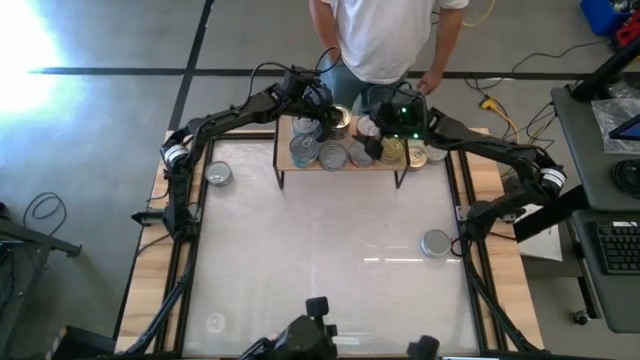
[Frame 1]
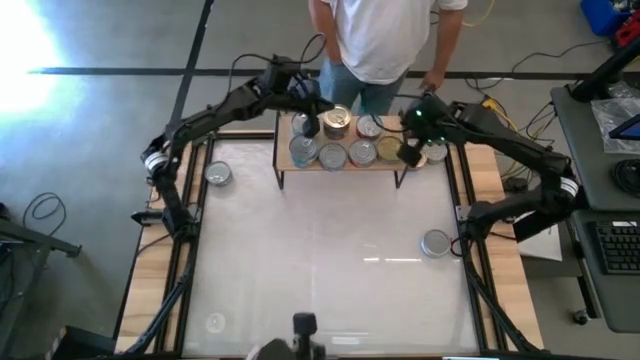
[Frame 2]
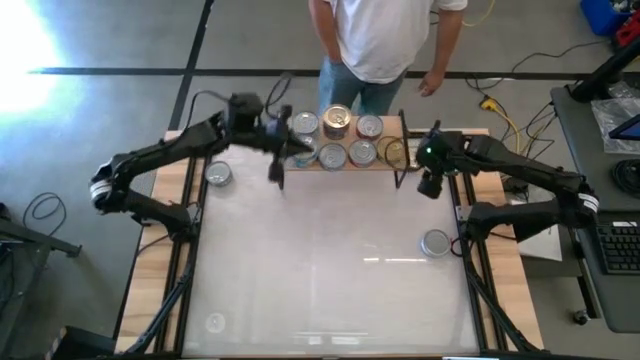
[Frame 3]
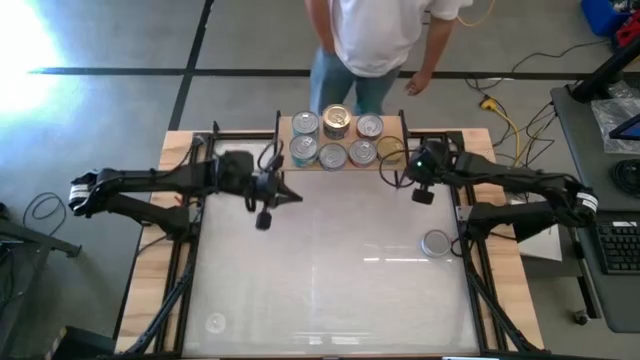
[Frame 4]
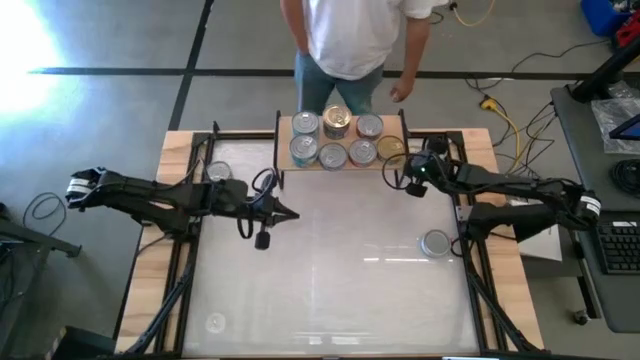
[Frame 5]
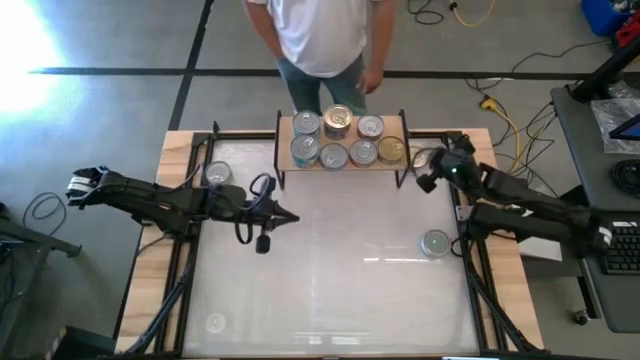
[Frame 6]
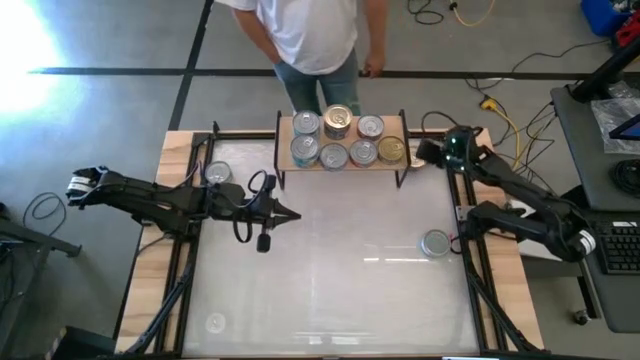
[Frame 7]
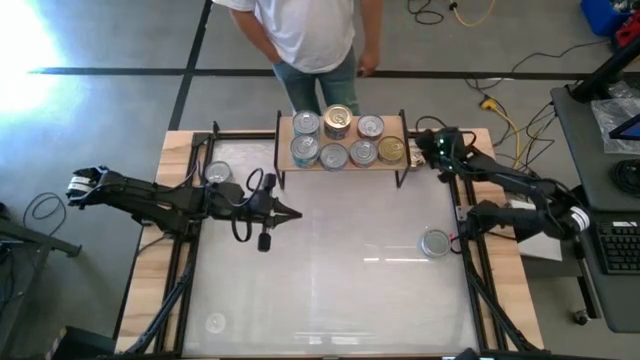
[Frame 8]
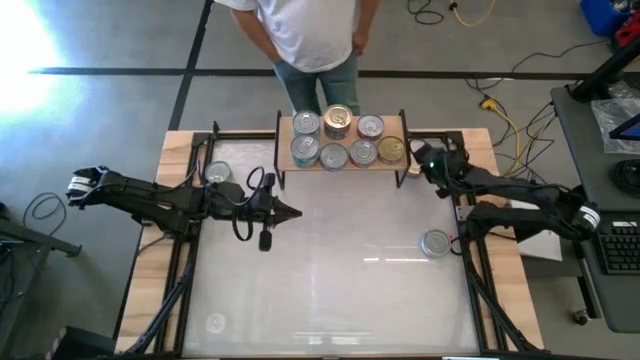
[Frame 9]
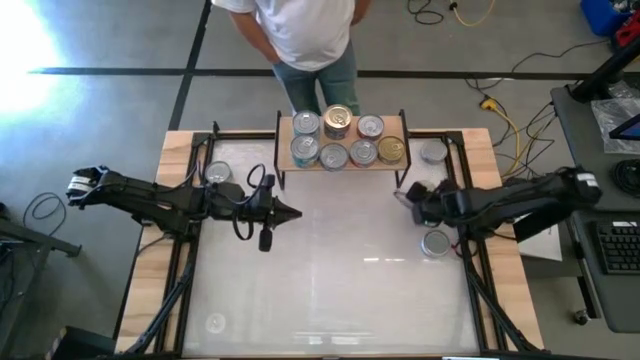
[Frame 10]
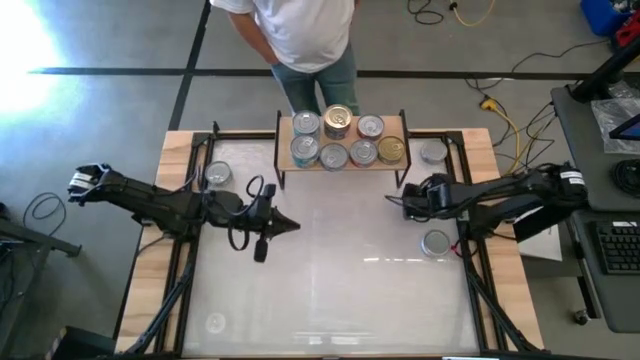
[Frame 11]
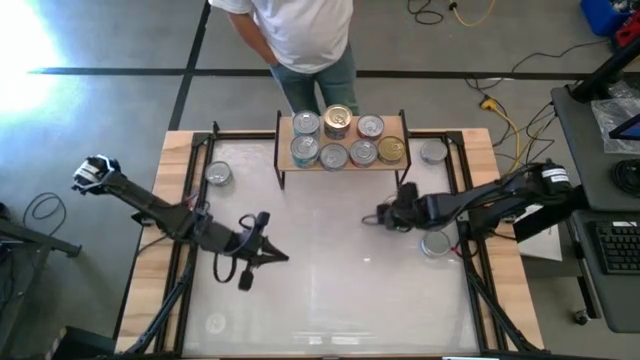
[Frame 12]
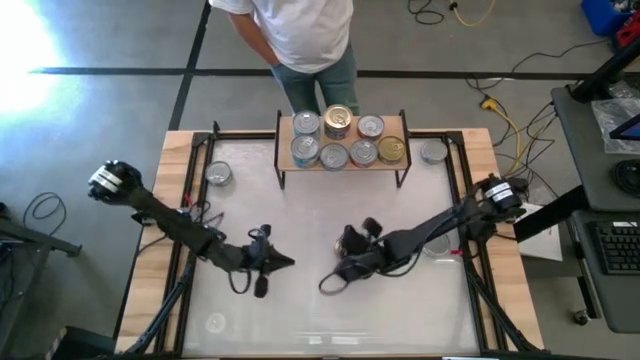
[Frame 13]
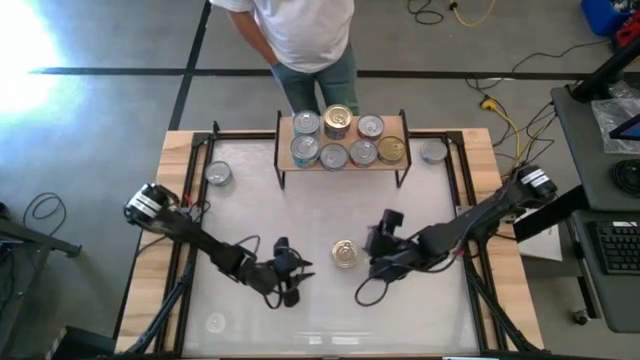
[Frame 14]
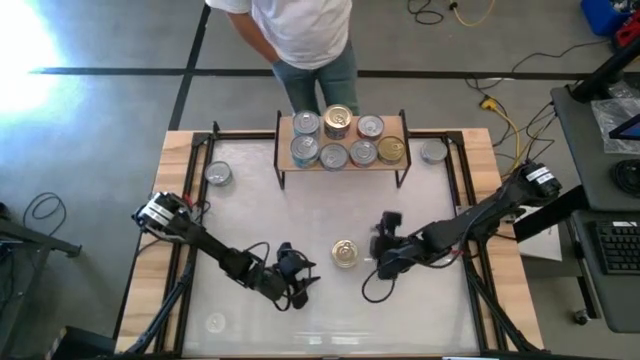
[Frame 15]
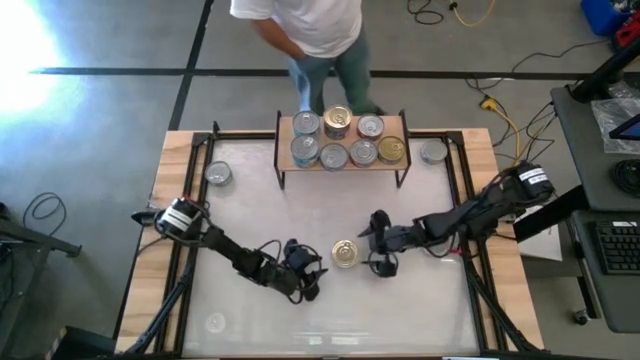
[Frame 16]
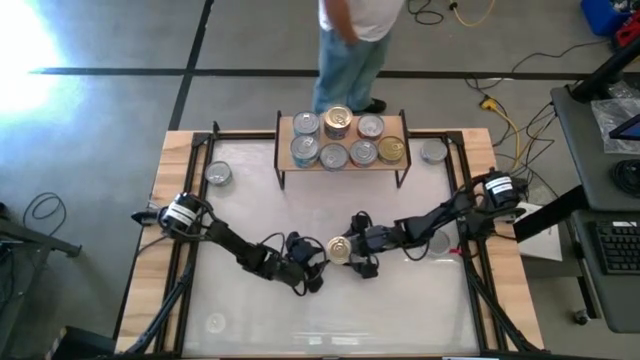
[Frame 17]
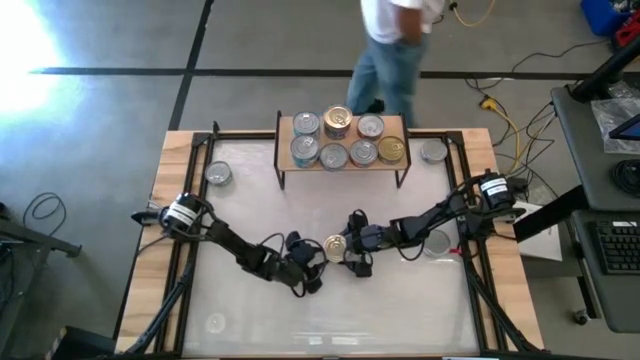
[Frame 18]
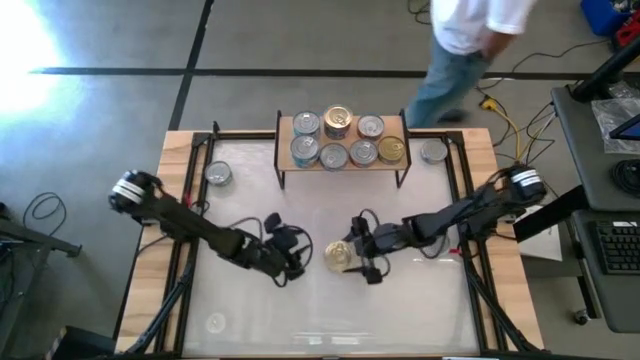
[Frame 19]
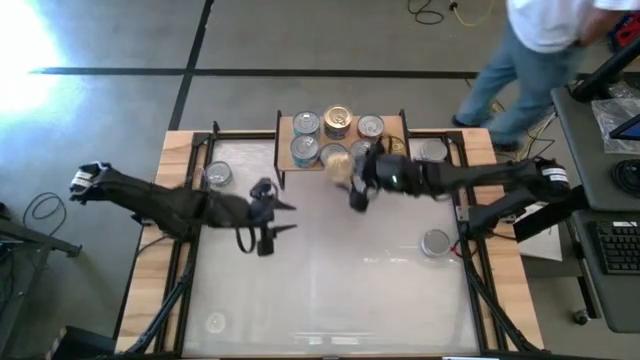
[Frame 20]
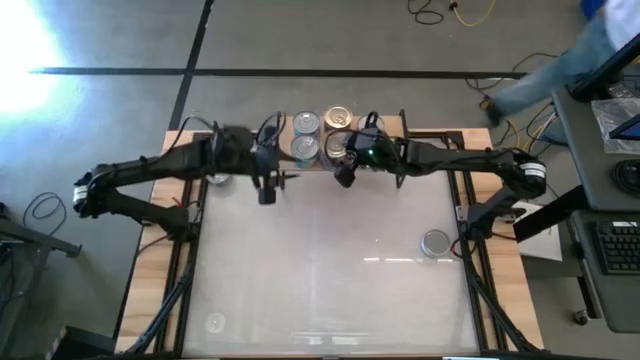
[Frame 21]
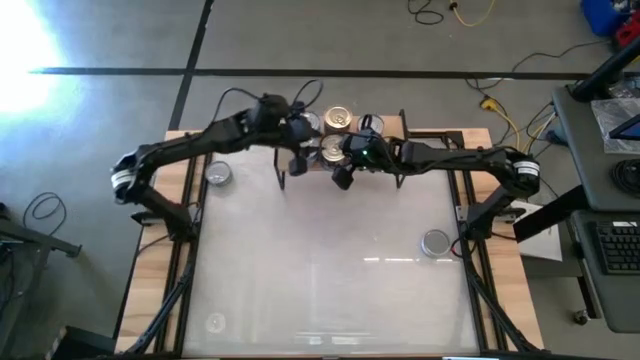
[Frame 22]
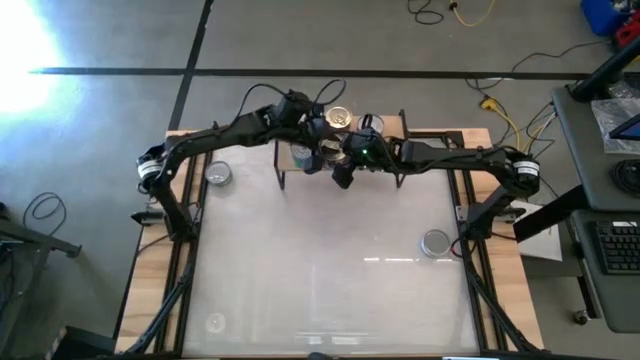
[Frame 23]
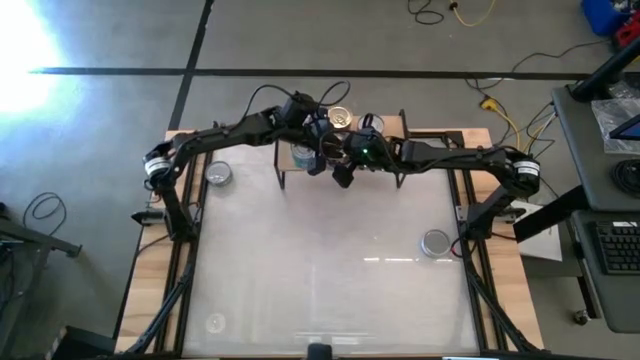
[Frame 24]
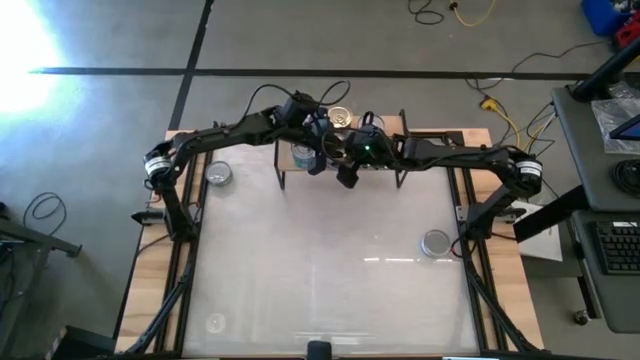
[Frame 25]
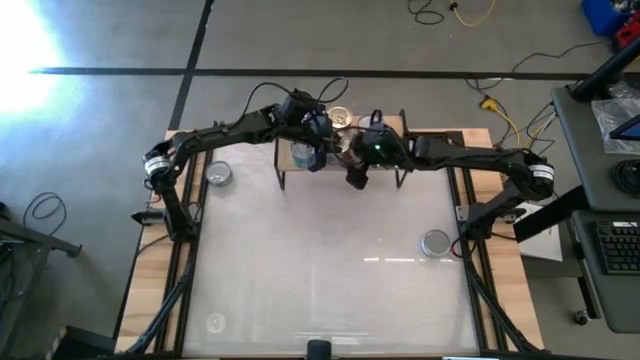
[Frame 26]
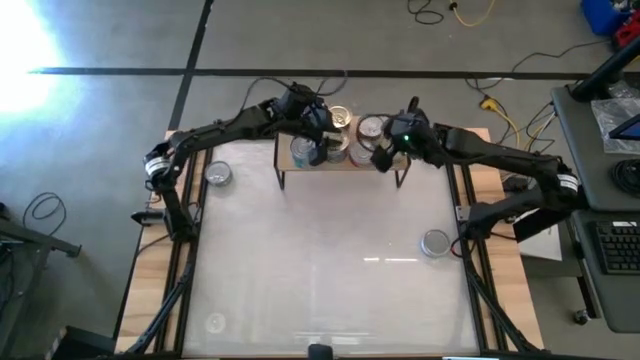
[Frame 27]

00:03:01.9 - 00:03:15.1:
Task: Stack canned seafood by type on shelf
Stack the blue-pink tuna can on top of the blue tuna can on the shelf

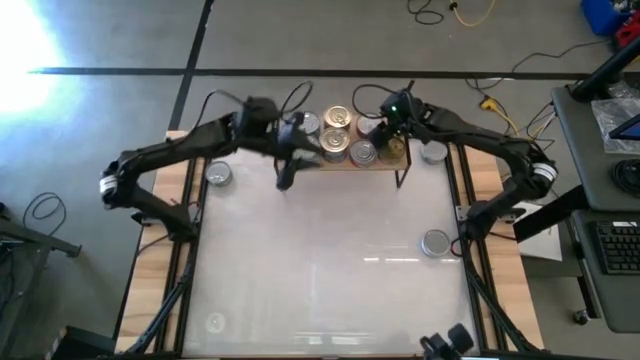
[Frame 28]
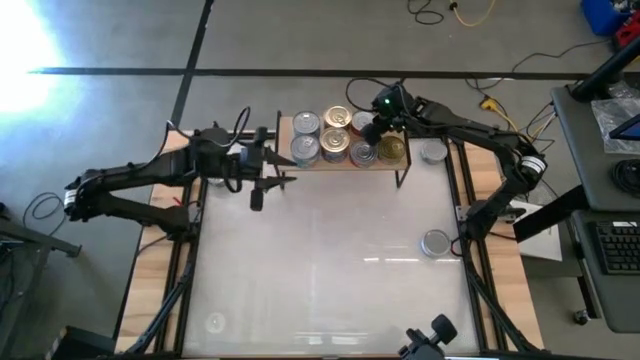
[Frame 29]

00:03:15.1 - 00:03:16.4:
Adjust the red tuna can on the shelf

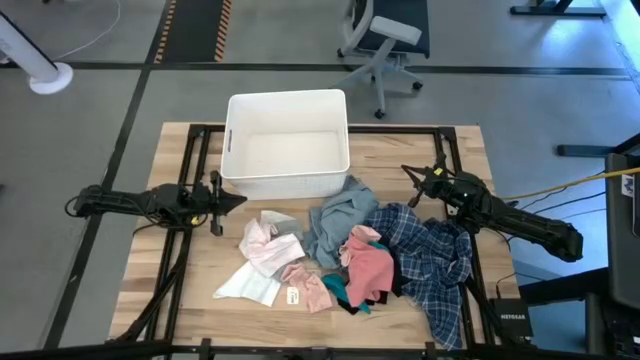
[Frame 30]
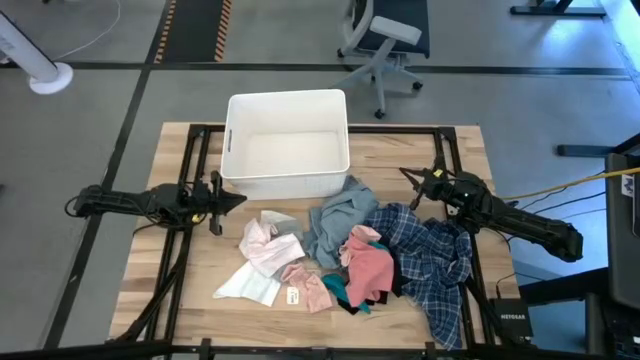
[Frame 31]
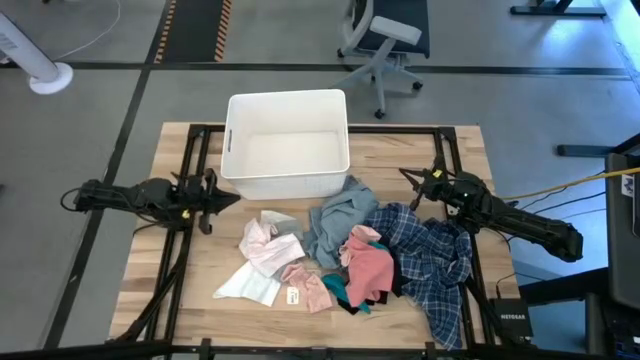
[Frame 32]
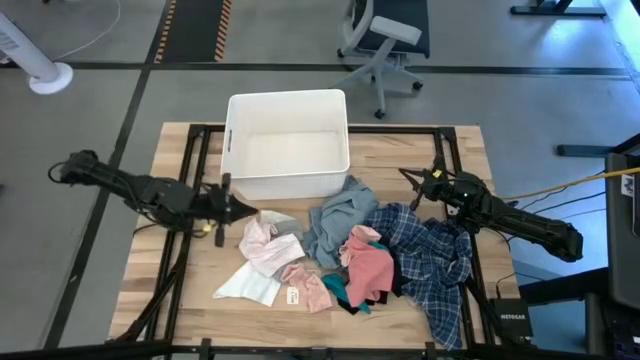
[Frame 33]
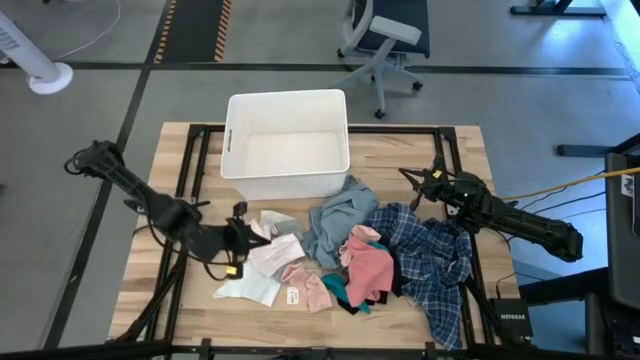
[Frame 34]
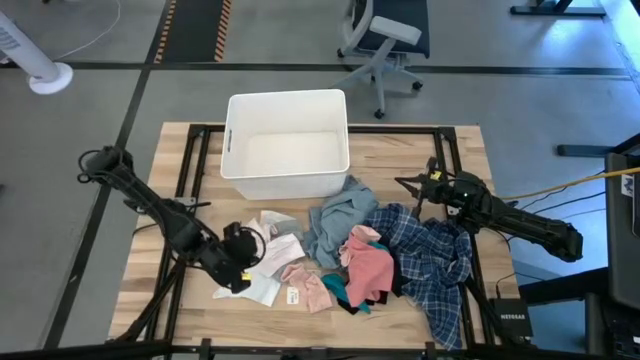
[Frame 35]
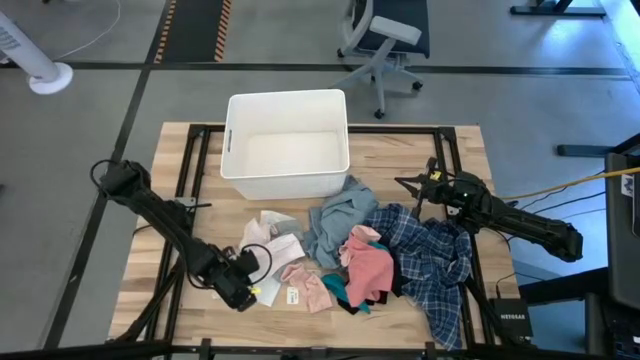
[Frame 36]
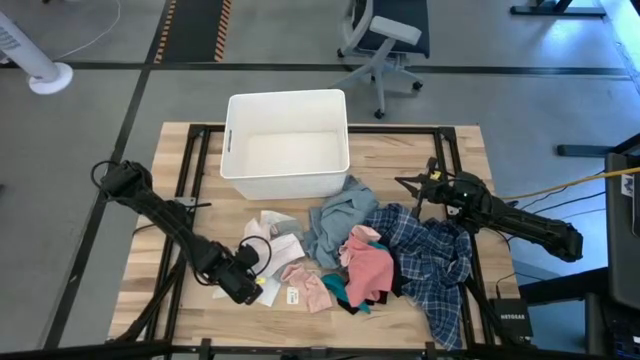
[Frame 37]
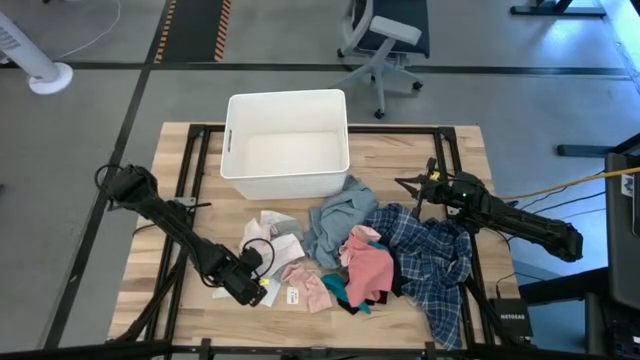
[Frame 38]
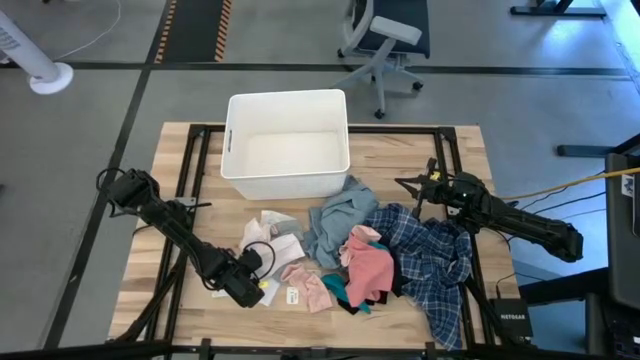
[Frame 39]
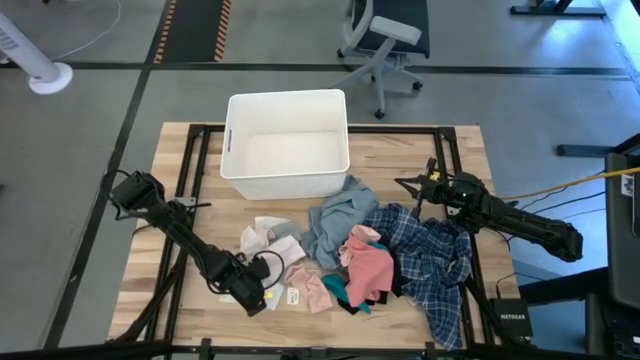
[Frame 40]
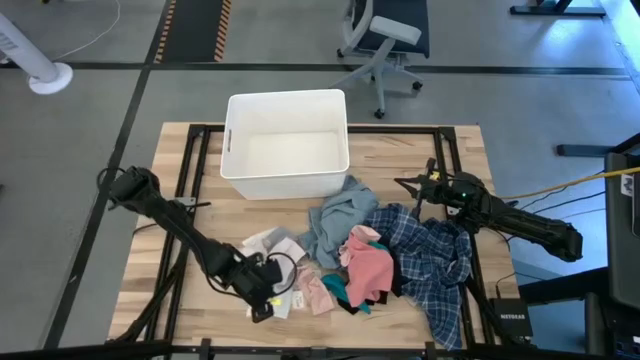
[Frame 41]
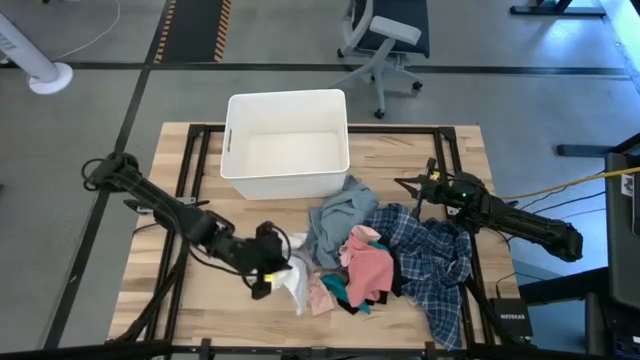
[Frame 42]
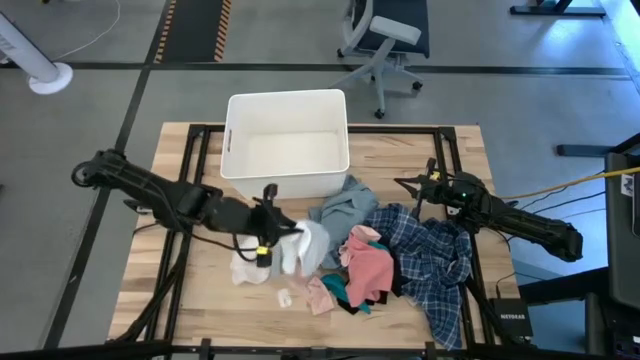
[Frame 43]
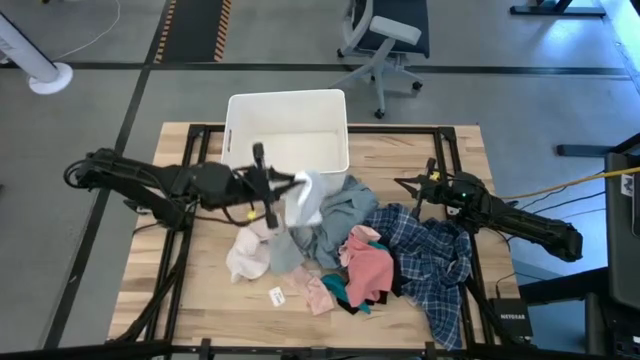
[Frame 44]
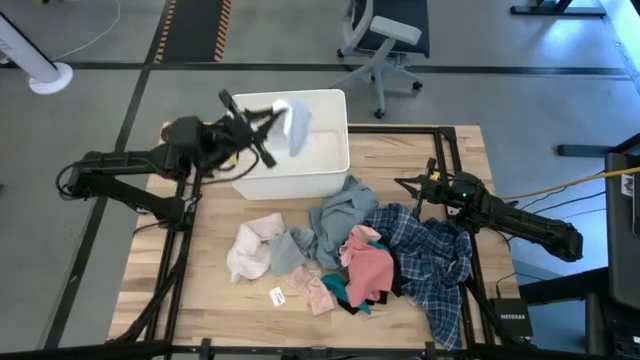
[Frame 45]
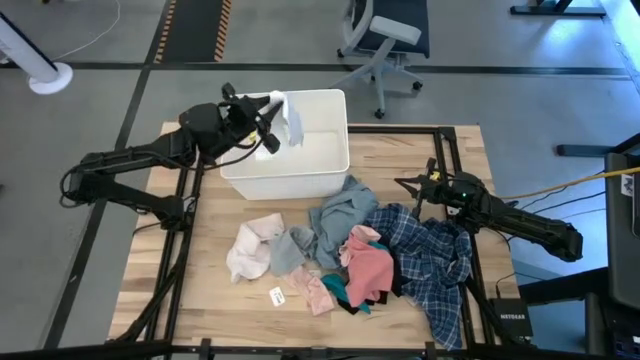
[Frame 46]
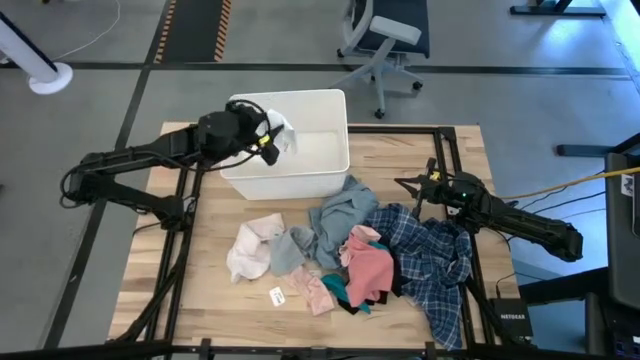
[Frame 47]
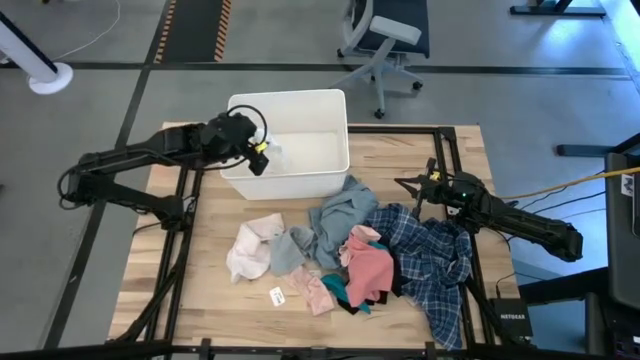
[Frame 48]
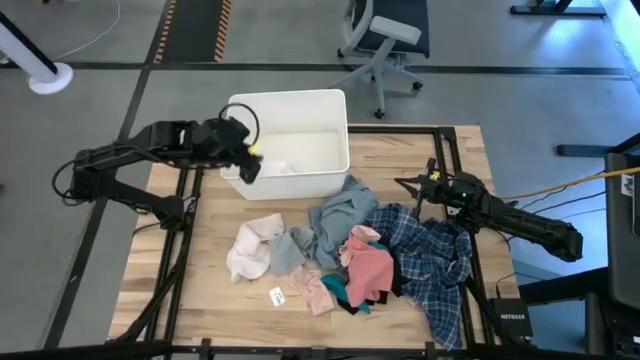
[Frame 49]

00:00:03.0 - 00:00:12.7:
Task: Sort clothes
Put the white underwear into the white bin
